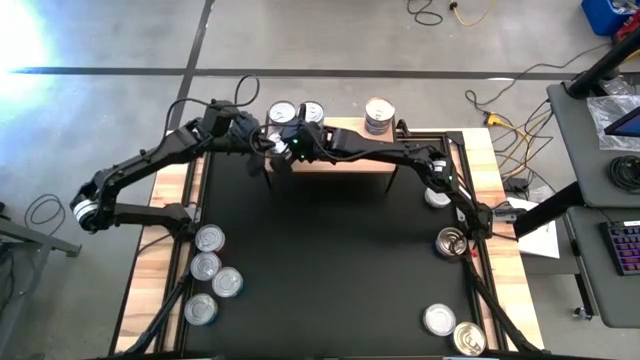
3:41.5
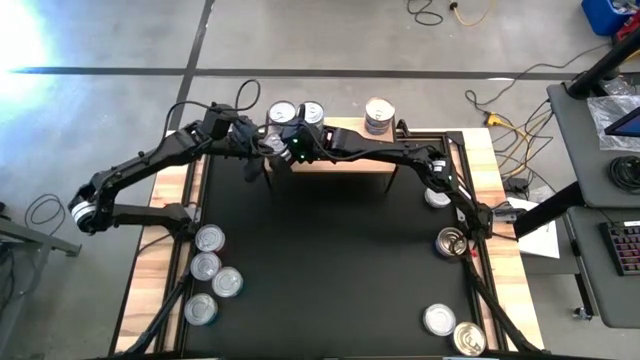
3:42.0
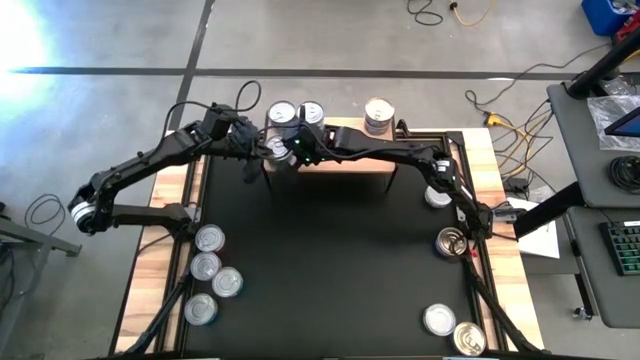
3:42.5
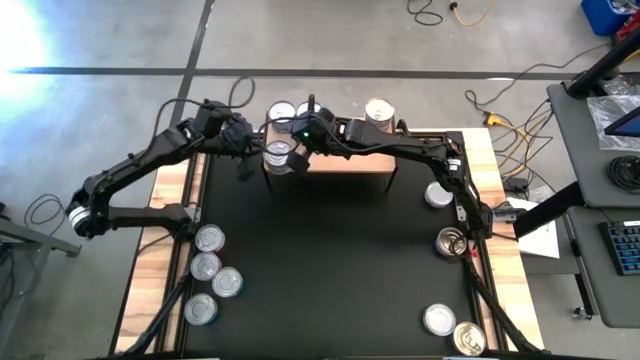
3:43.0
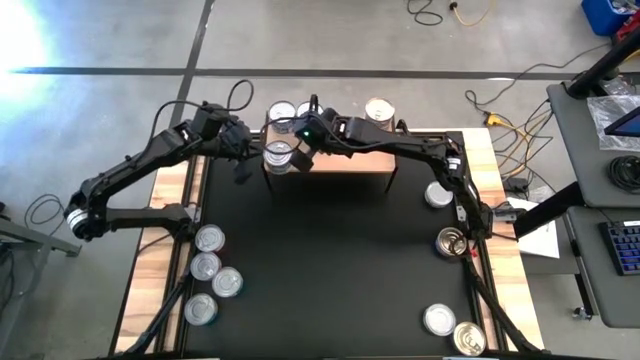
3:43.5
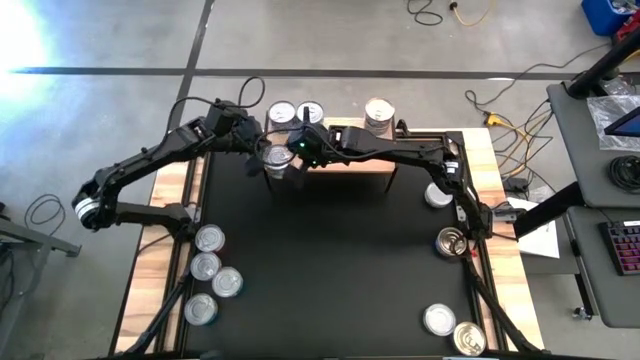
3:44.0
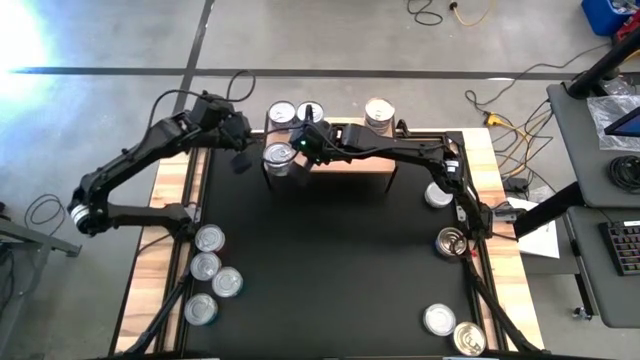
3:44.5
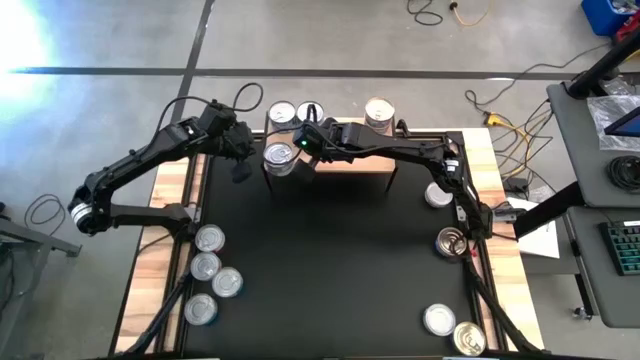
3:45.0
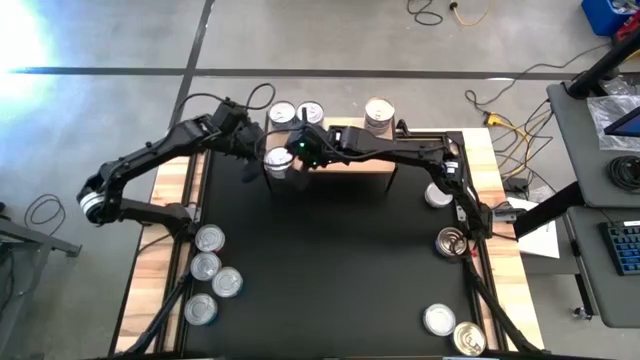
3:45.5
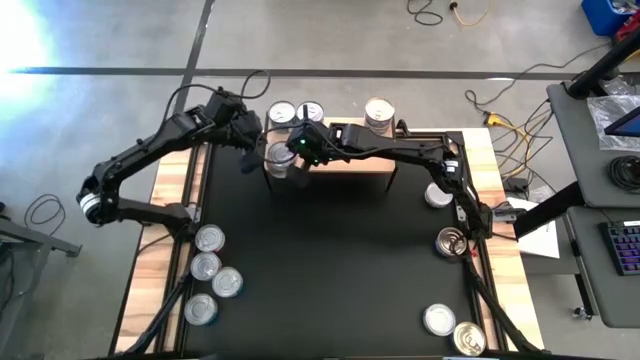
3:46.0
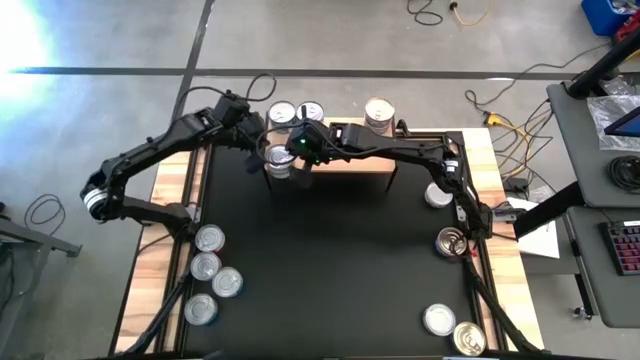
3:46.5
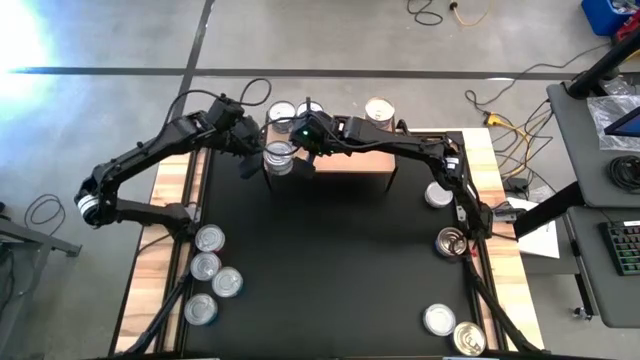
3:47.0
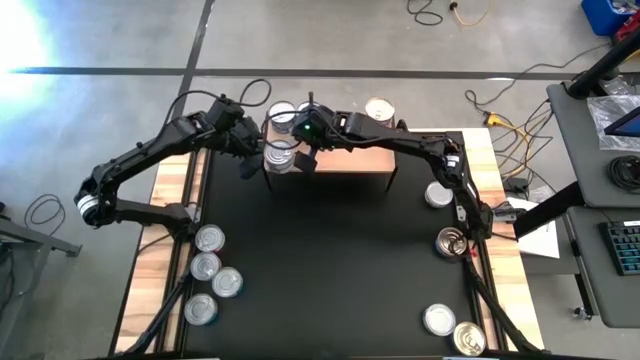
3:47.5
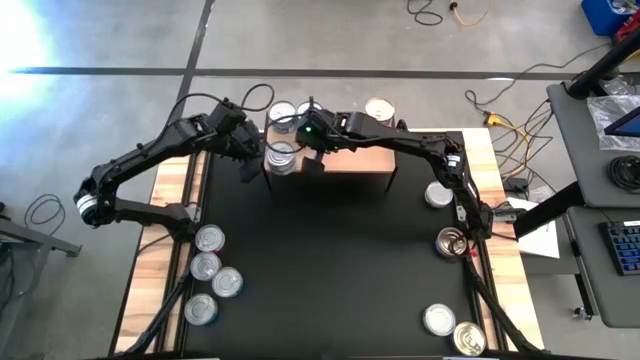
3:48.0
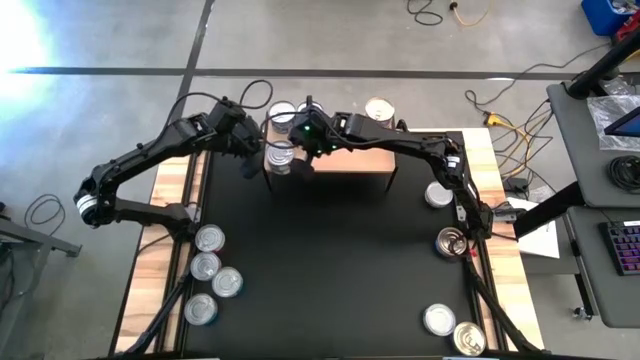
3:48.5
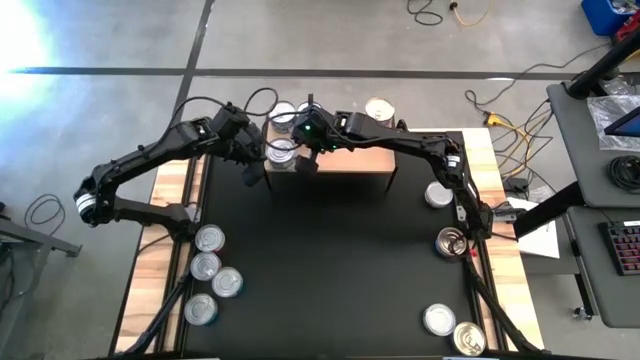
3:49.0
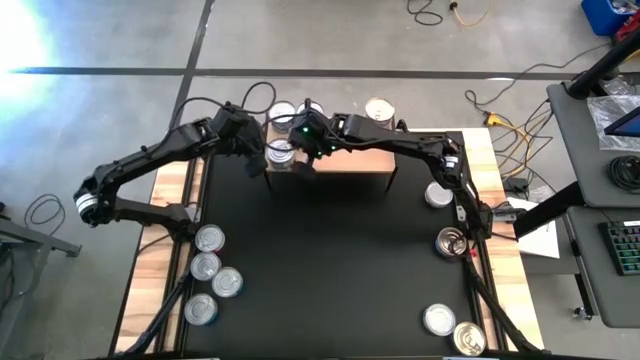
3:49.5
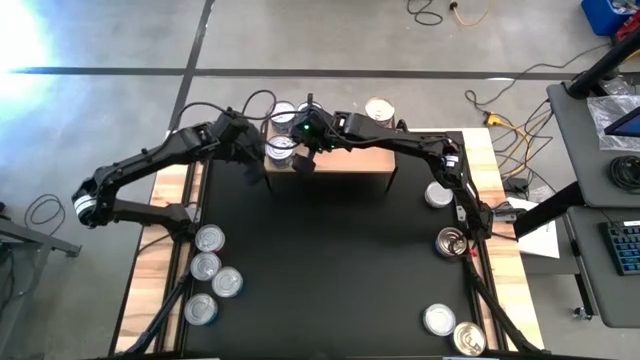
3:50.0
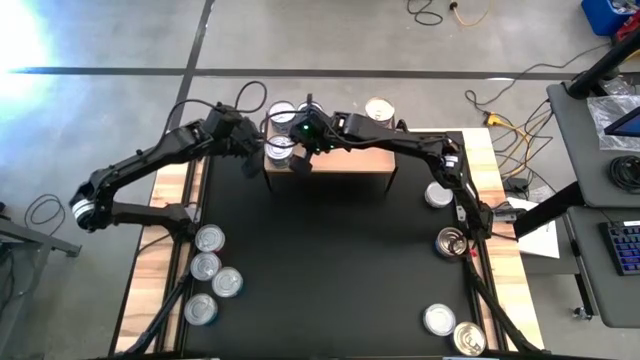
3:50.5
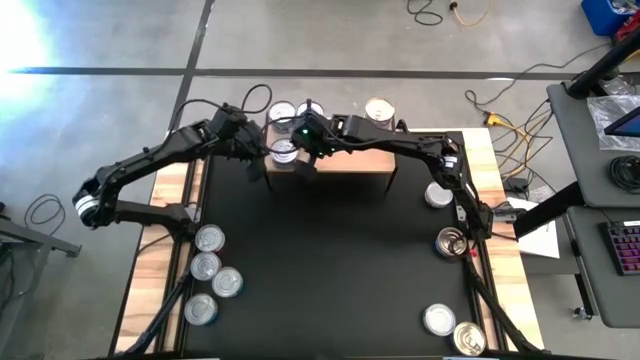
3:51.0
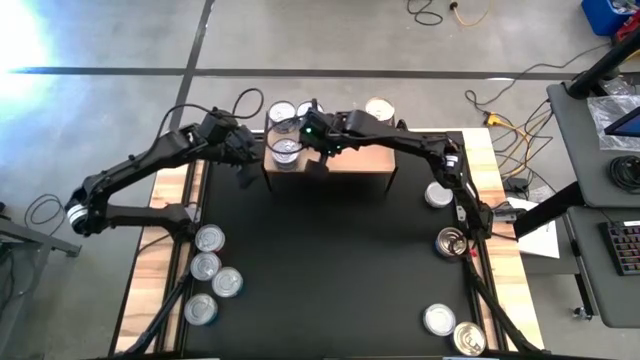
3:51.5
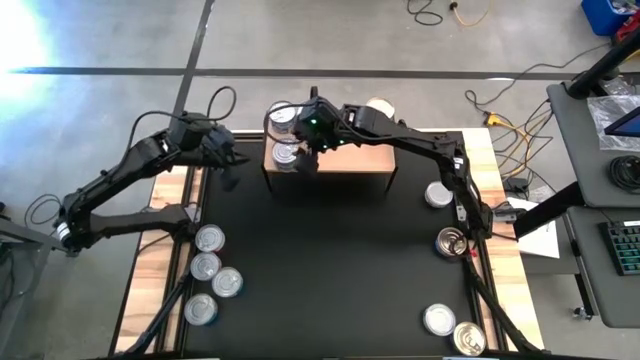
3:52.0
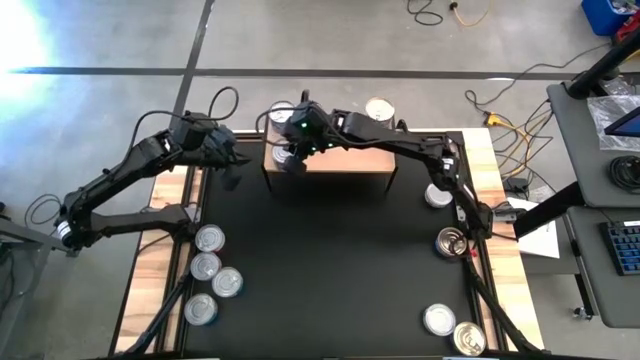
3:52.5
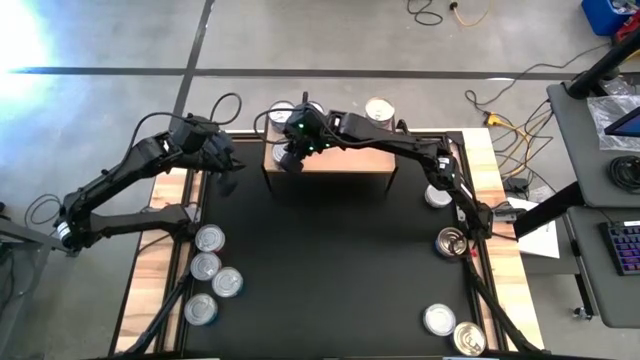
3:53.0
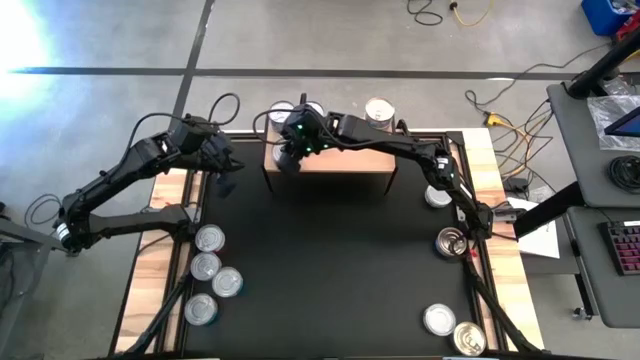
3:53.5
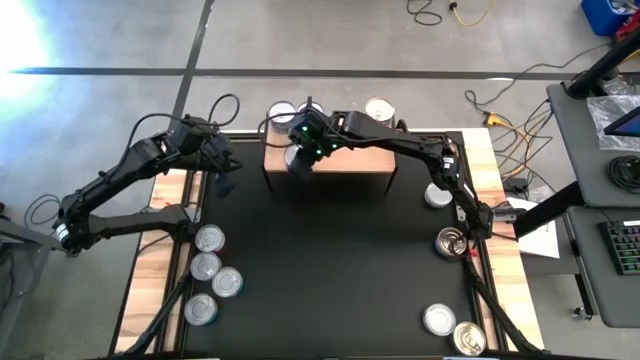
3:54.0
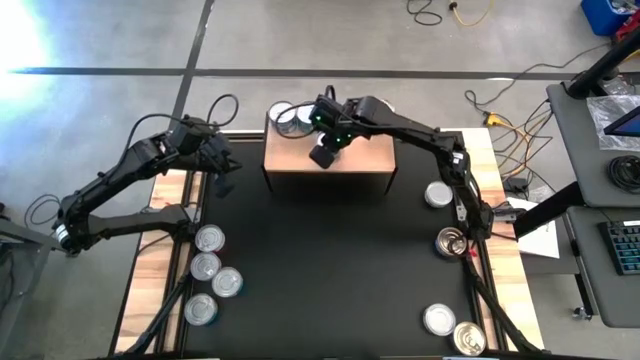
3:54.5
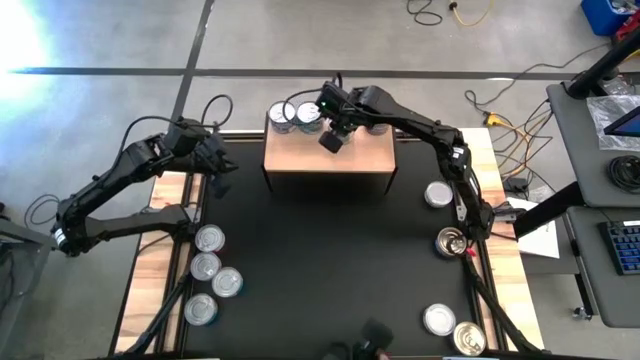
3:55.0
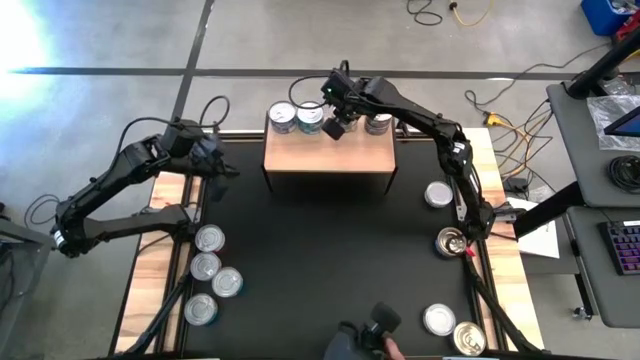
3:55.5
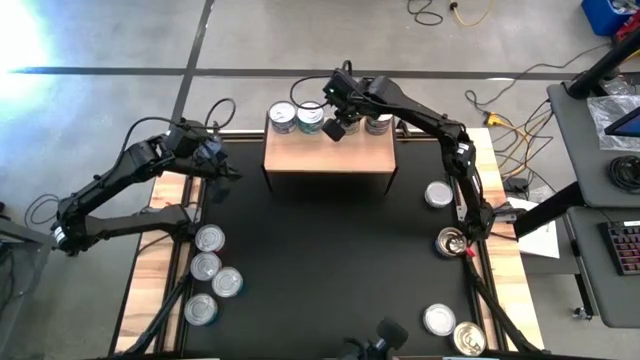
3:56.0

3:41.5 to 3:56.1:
Task: Stack canned seafood by type on shelf
Stack the green tuna can on top of the green tuna can

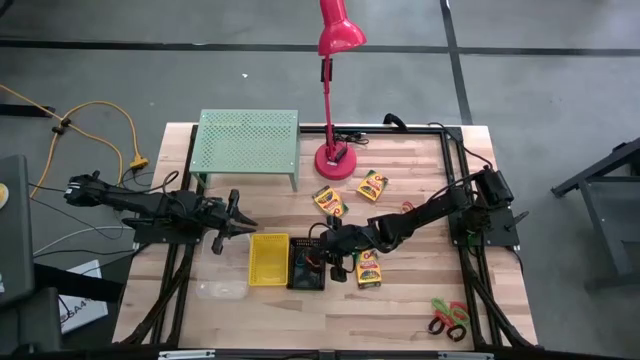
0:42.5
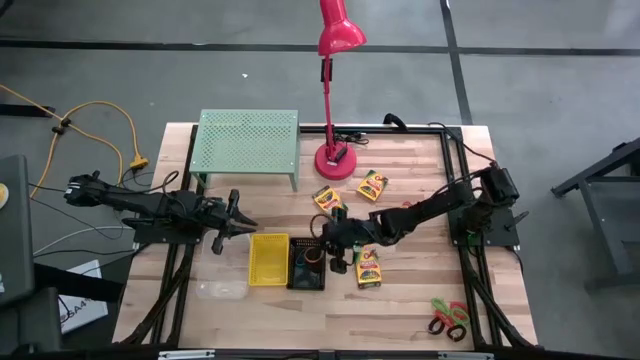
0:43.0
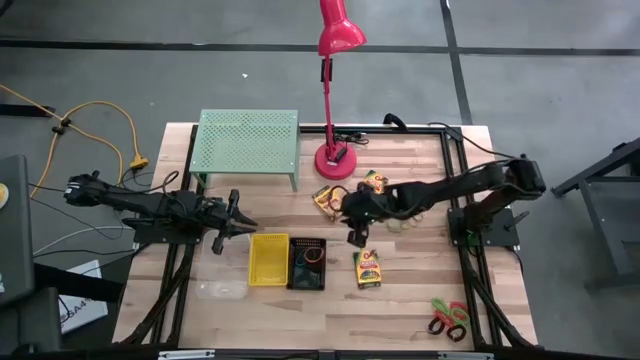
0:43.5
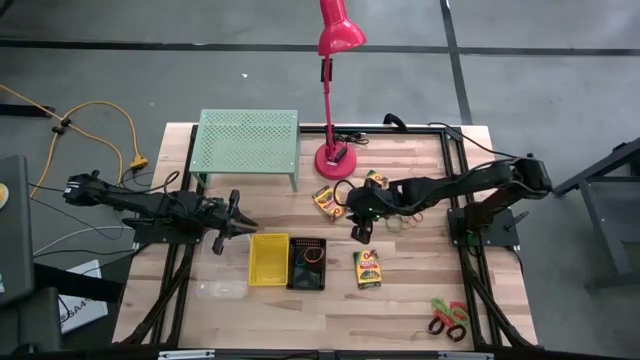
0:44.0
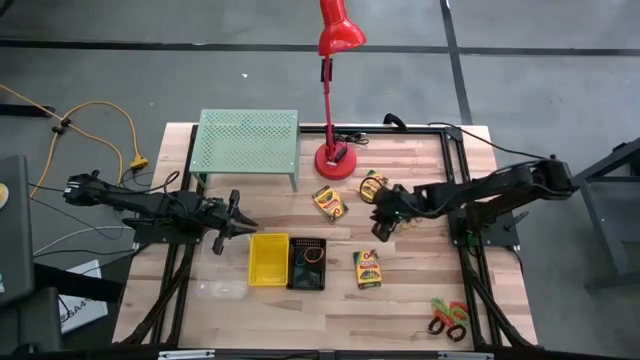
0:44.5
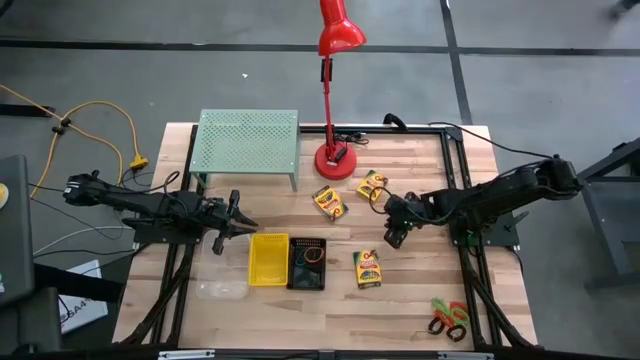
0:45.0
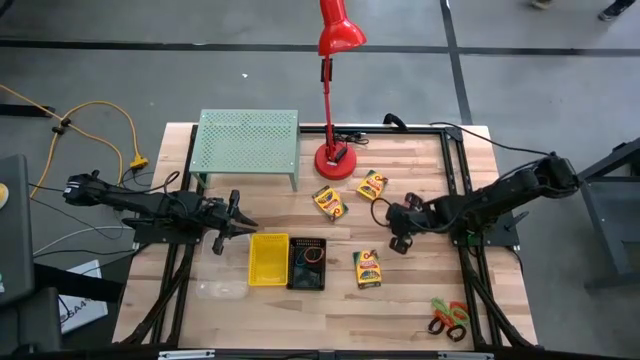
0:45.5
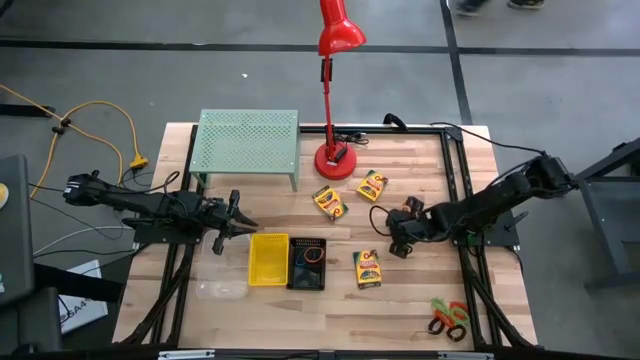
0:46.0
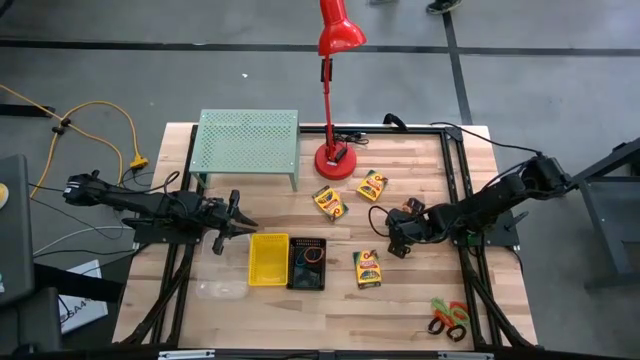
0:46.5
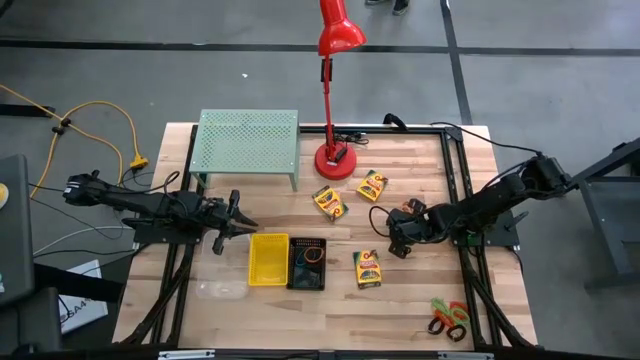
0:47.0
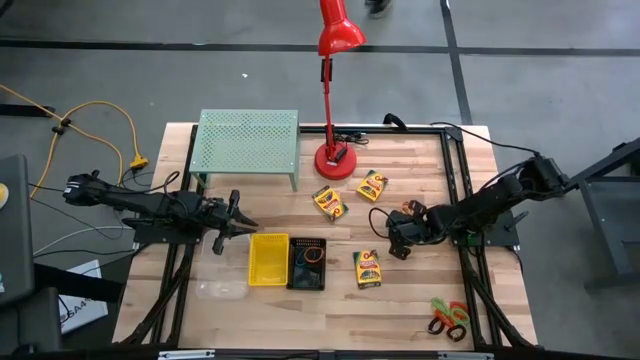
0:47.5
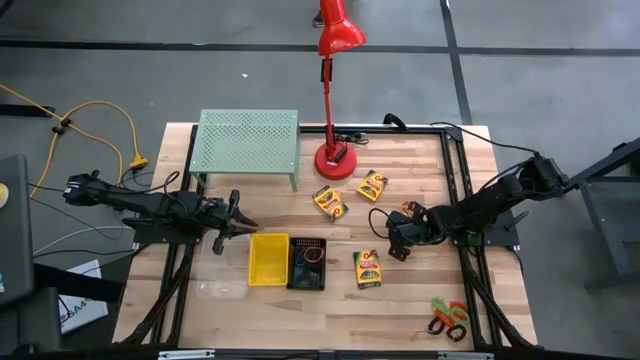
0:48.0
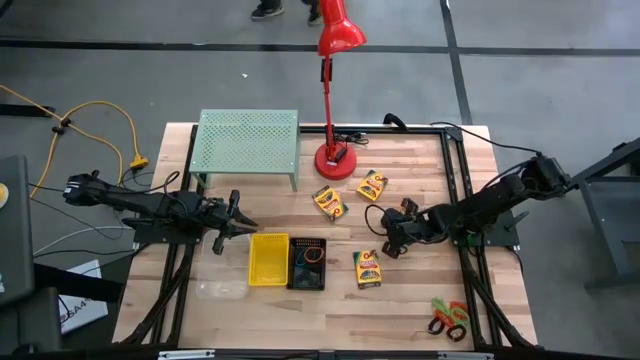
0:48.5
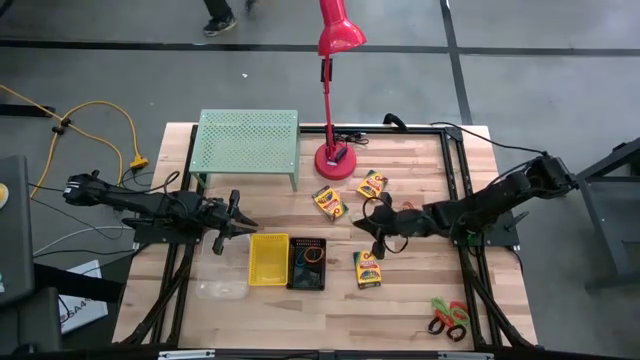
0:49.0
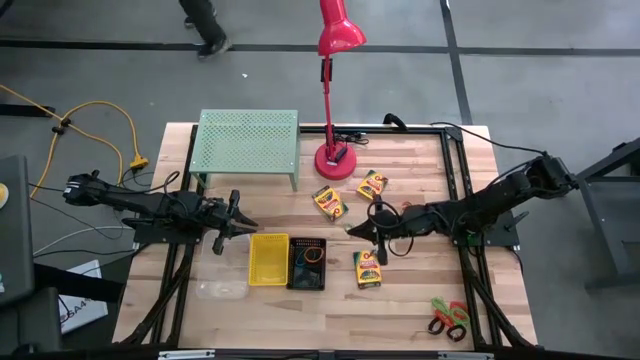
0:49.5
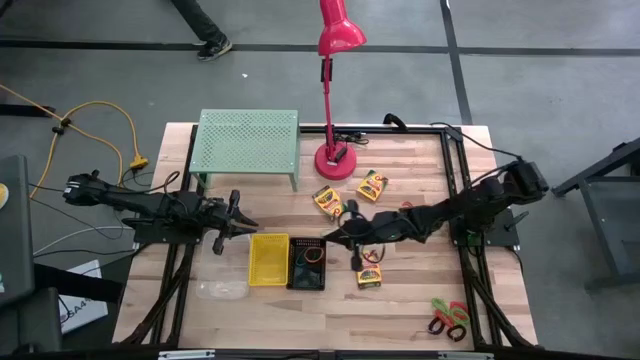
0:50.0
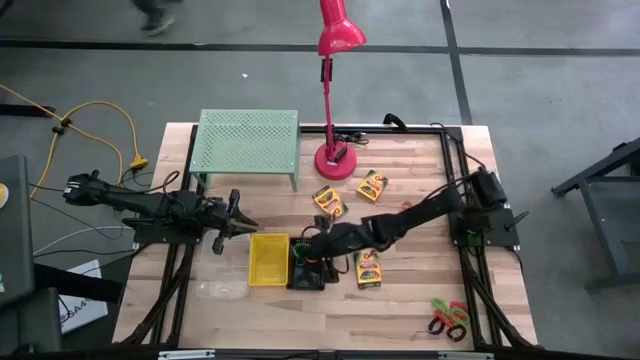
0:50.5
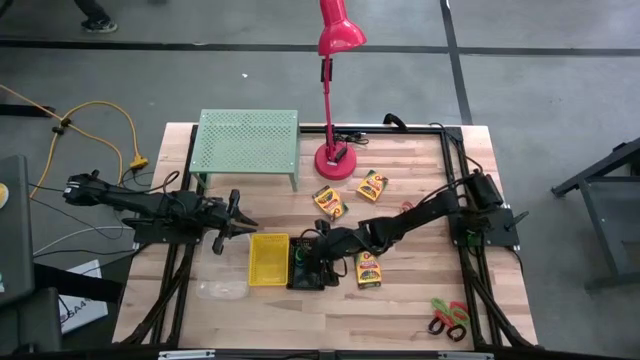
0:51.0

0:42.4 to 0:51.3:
Task: Pick & Place Office Desk Supplies
Put the green rubber band into the black bin
